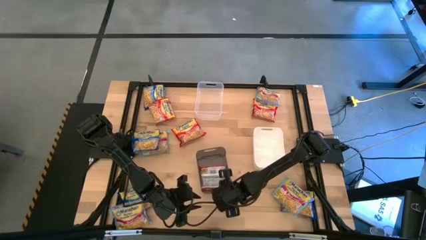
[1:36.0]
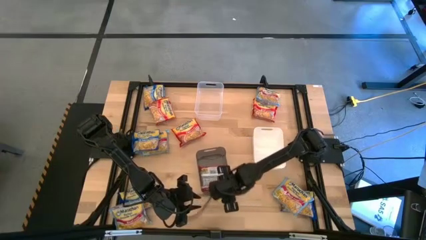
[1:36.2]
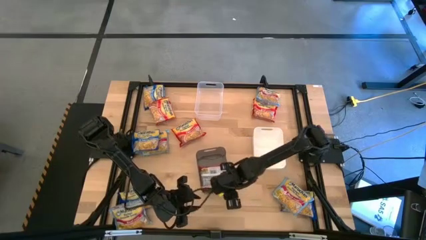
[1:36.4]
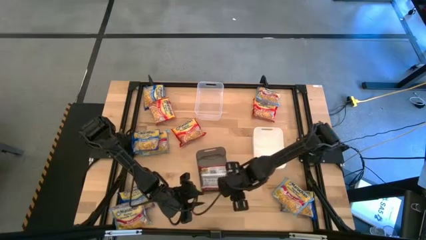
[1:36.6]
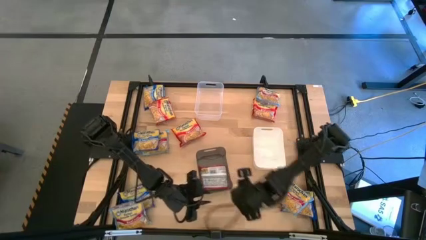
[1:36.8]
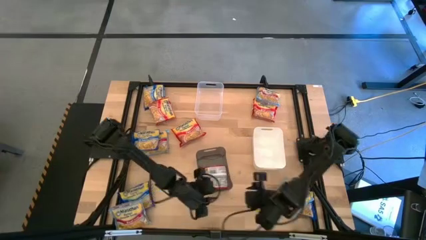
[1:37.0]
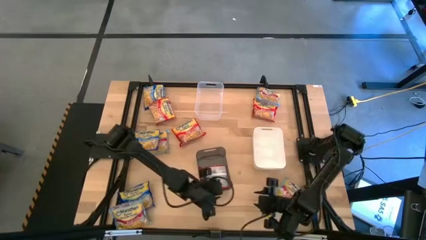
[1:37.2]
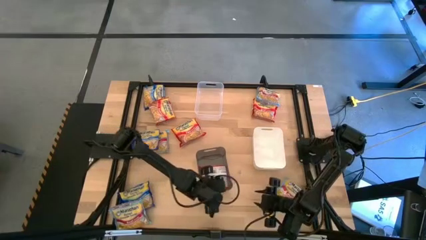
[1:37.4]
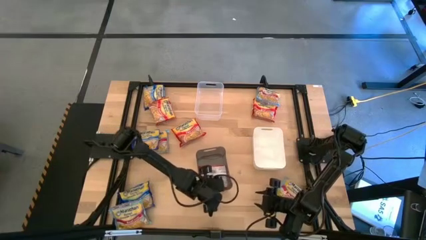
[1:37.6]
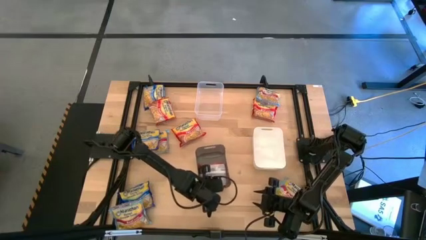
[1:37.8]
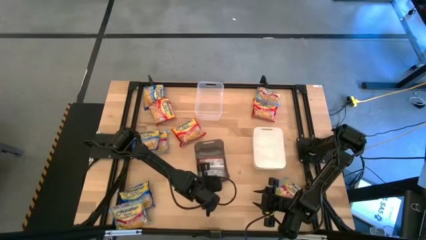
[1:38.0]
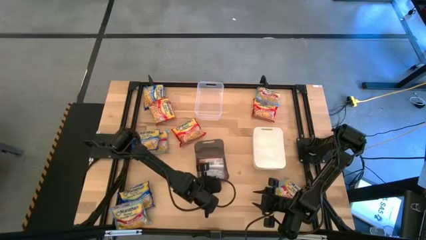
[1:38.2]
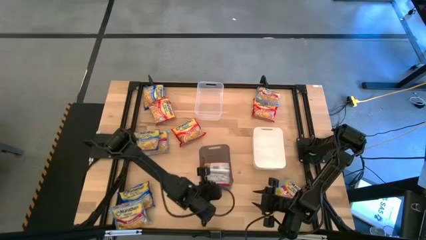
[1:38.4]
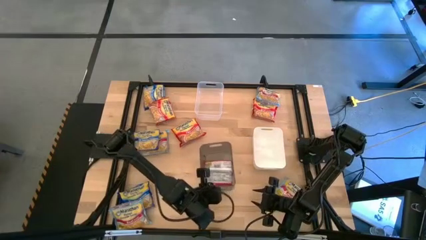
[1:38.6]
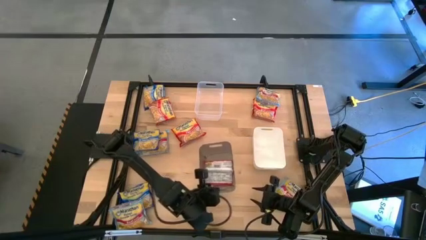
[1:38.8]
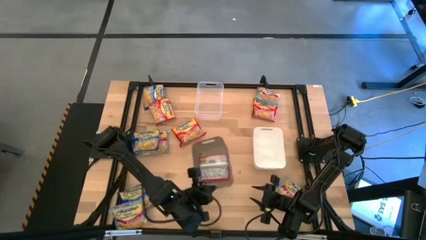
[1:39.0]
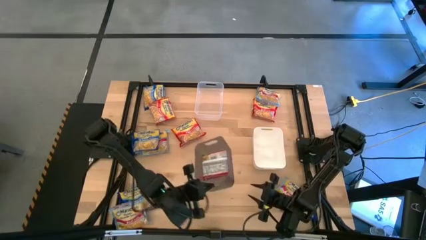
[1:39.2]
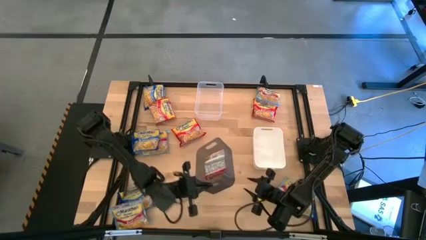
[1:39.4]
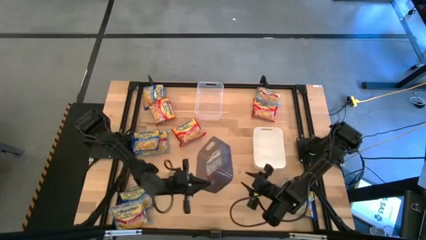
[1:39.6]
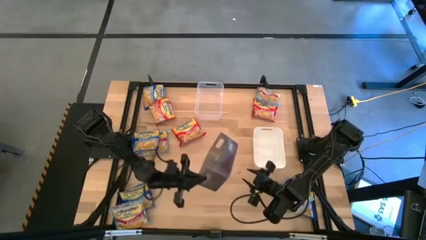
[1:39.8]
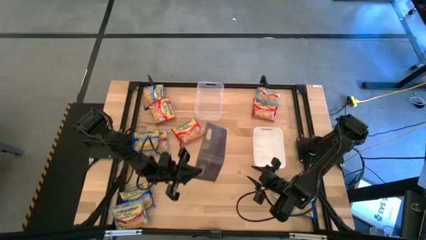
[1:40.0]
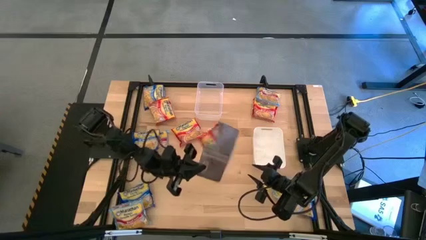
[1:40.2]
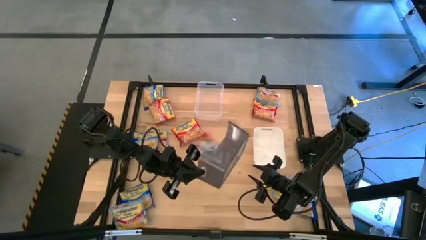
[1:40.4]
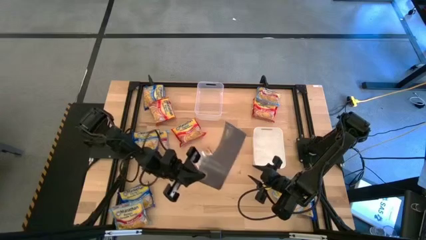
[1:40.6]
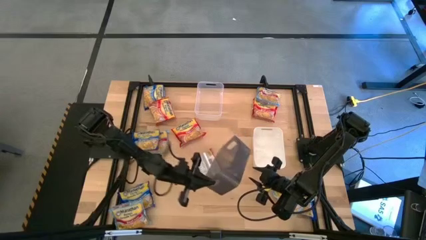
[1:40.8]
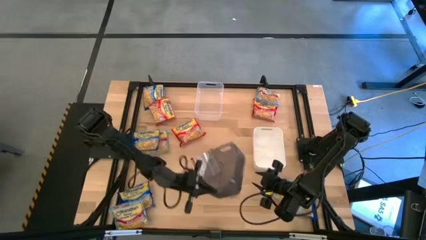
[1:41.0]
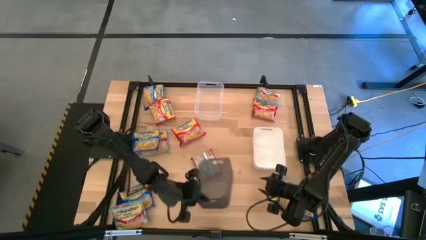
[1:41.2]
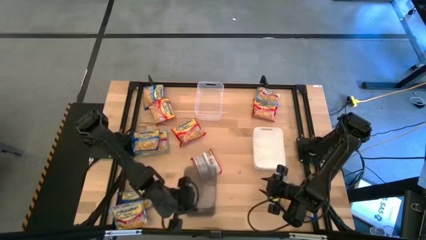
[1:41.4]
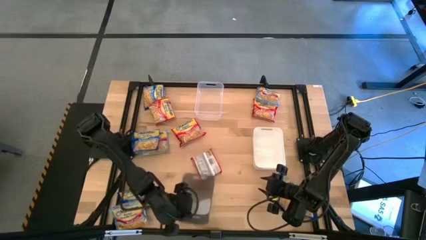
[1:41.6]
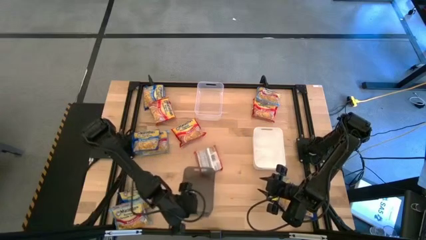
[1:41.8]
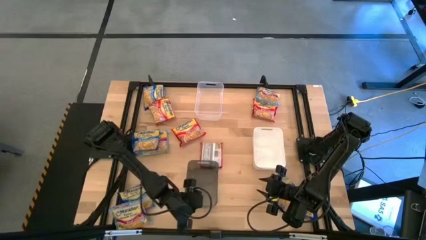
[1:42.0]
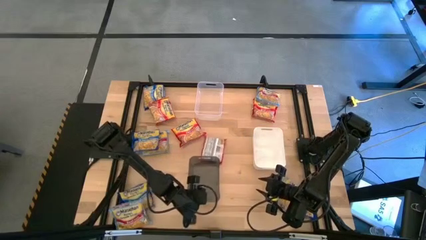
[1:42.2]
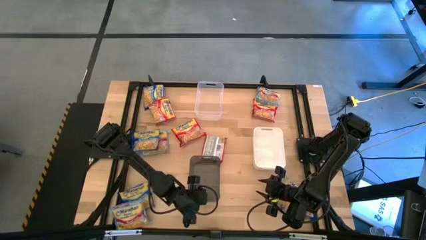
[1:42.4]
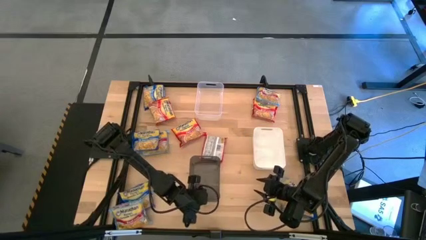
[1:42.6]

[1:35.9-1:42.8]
Task: Sort Maruchan noodles
Remove the red noodle pack from the gray bin

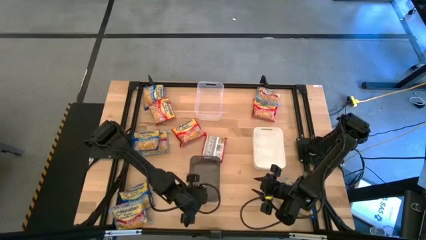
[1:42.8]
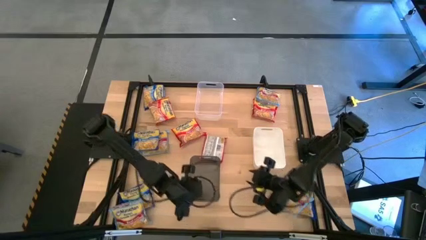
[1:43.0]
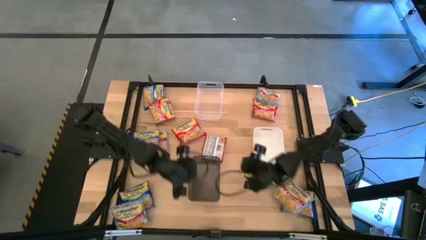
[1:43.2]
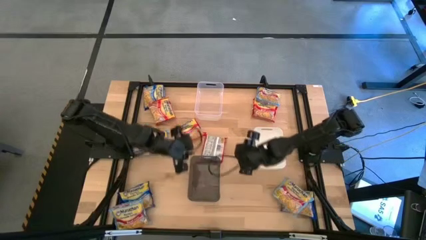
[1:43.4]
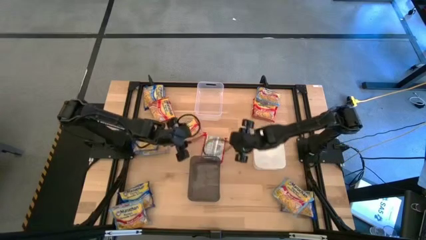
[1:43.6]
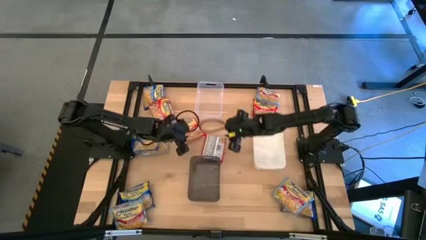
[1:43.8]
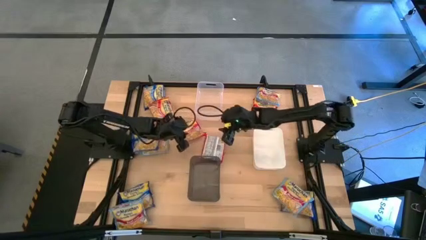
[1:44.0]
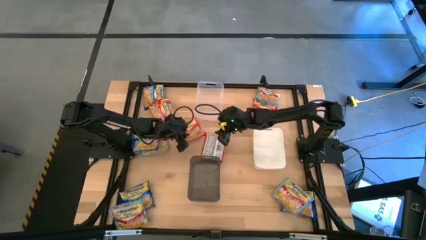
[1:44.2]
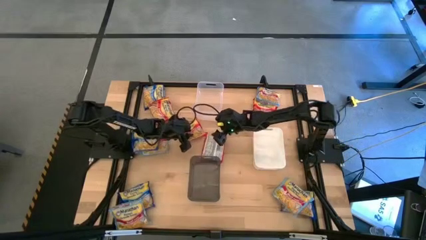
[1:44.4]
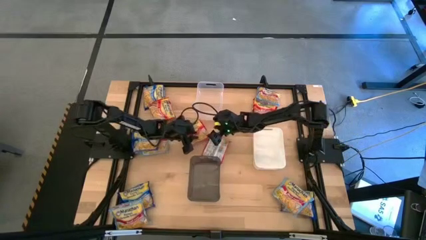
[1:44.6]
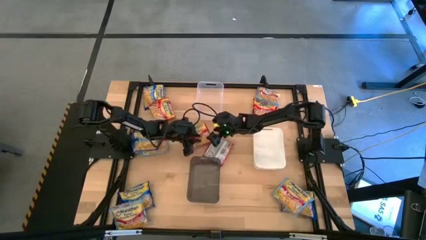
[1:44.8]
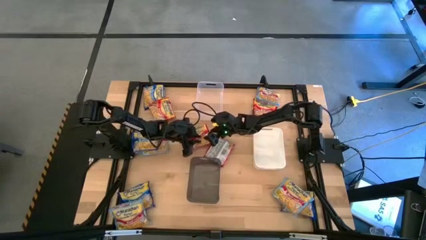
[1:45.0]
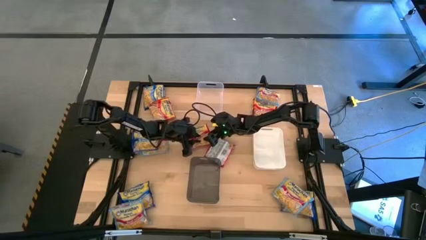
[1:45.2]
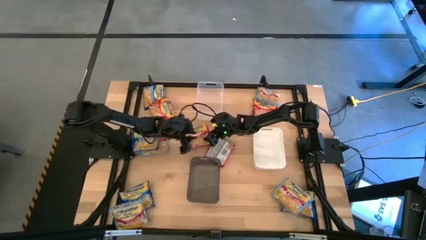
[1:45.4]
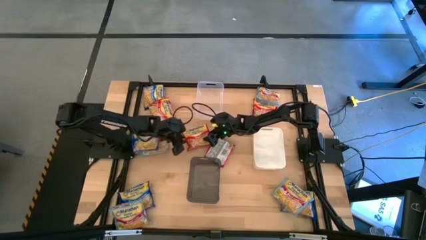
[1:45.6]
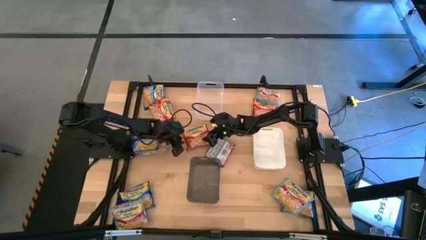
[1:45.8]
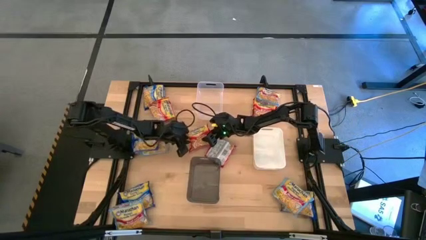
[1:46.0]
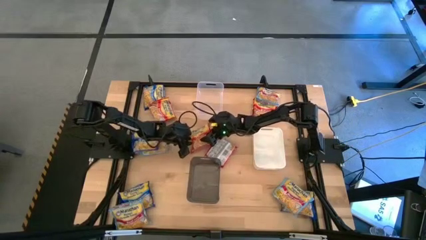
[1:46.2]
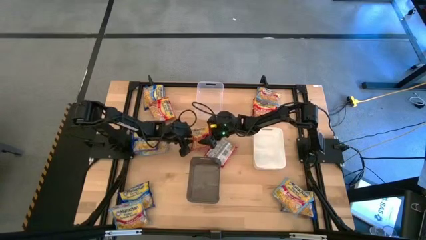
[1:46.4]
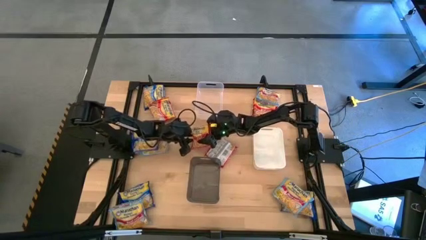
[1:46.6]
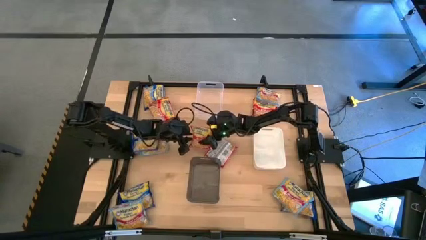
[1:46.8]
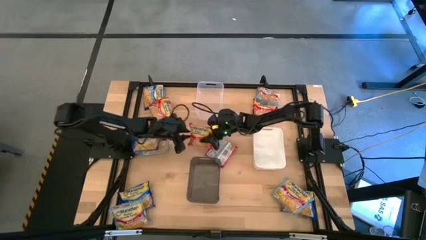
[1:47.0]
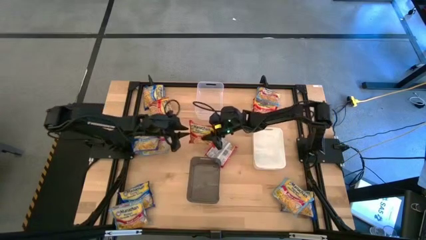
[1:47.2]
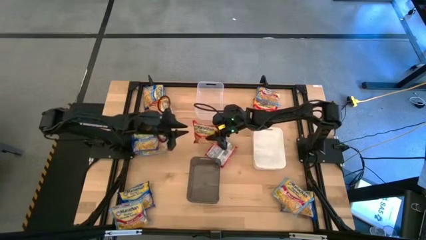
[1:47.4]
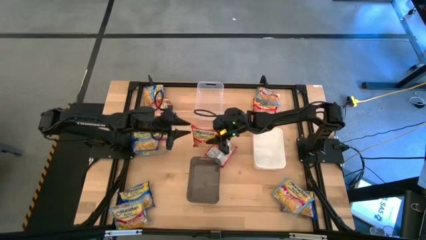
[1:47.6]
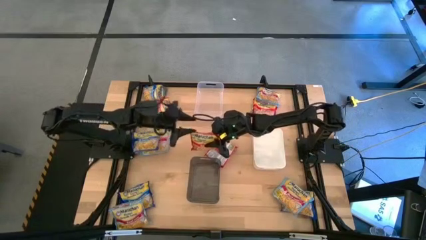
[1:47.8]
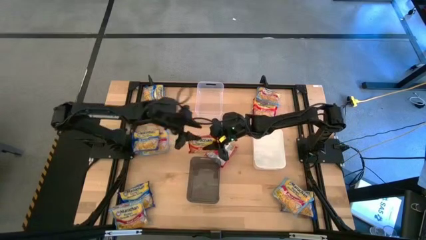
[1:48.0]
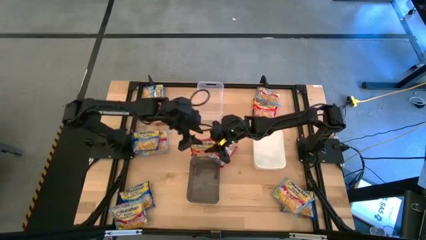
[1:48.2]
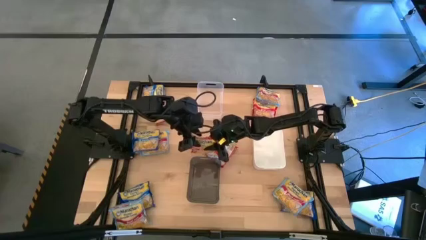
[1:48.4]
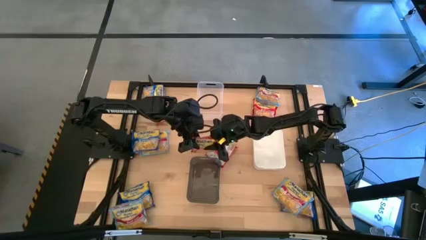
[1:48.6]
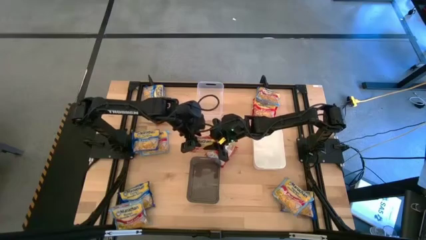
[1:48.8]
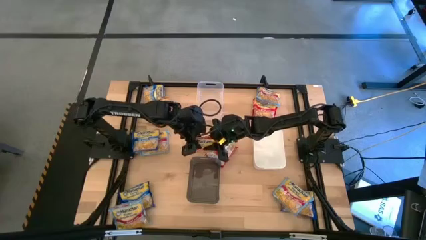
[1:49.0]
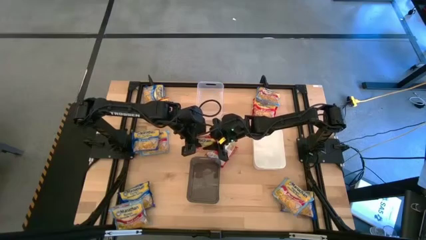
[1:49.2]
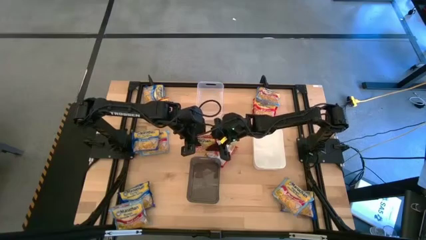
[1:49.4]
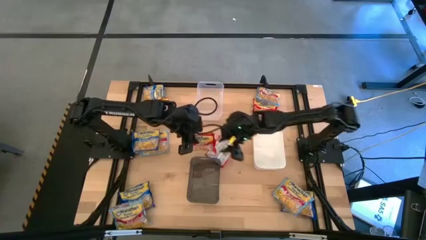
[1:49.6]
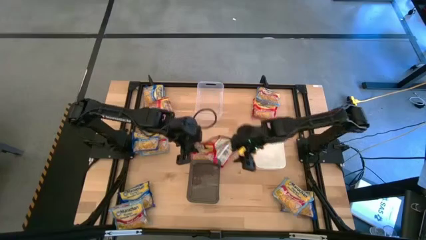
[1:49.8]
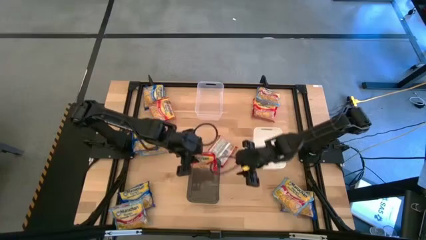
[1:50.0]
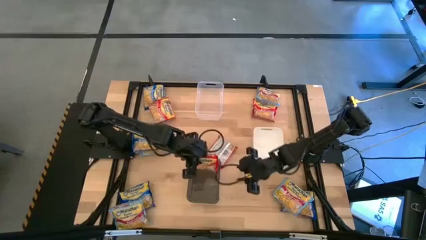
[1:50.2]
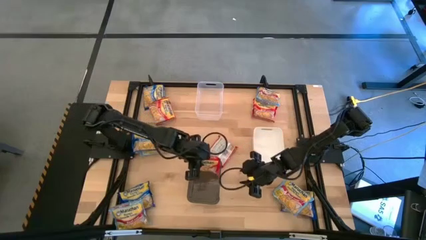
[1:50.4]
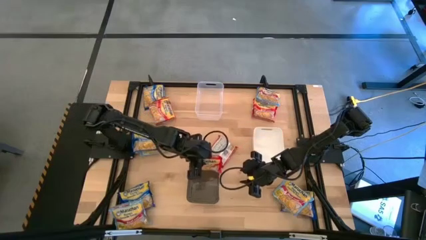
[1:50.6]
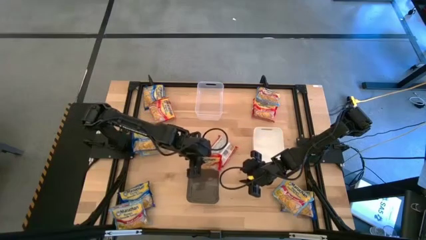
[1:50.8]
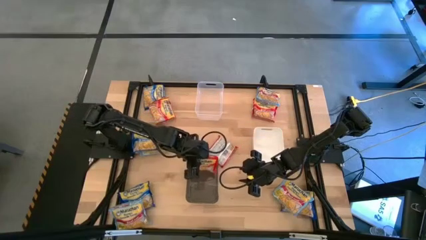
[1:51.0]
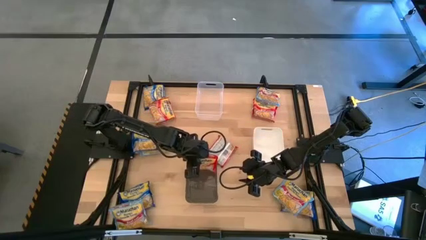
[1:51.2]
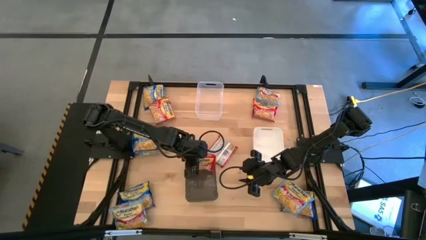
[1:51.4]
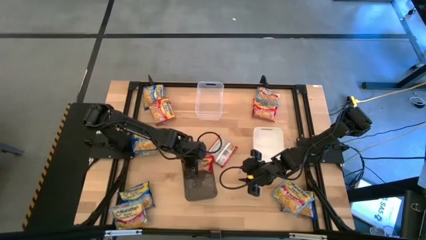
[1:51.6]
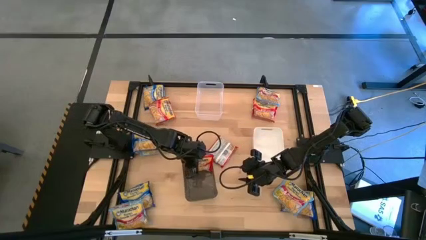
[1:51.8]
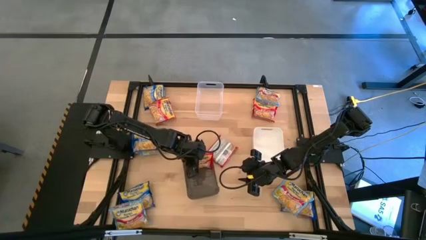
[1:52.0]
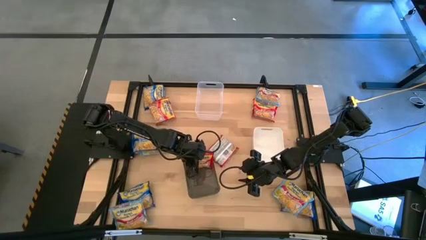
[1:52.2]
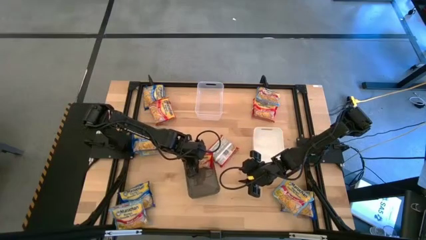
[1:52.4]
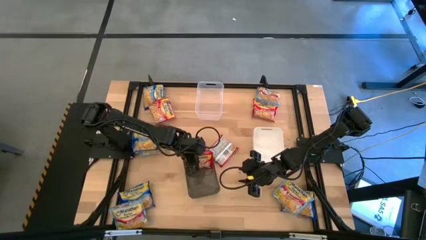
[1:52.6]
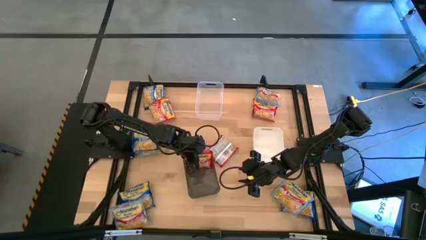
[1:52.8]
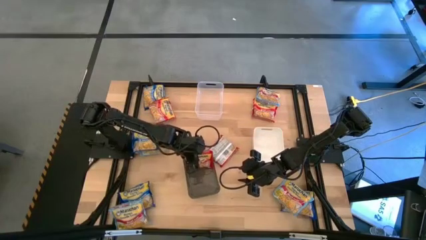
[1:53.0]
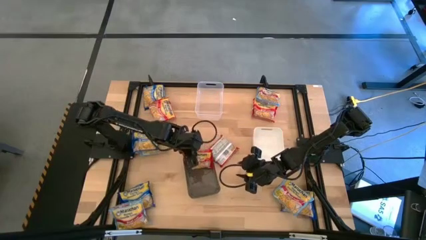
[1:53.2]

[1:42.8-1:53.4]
Put the red noodle pack into the gray bin
